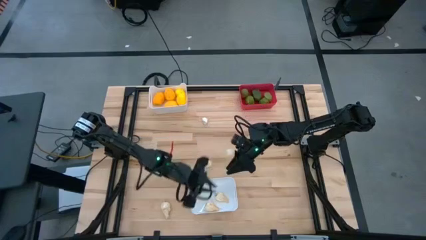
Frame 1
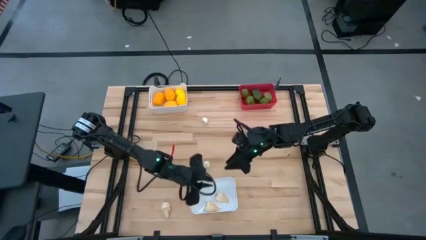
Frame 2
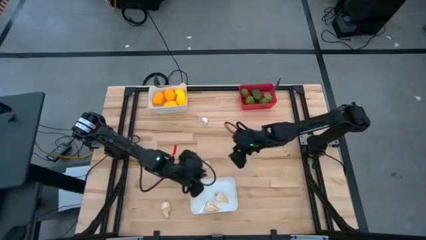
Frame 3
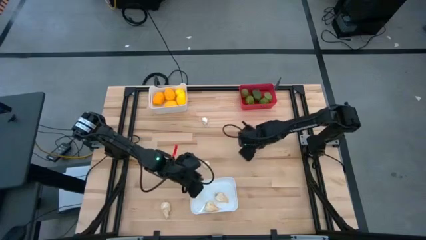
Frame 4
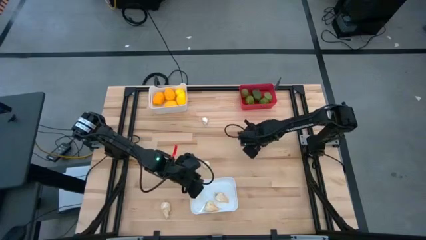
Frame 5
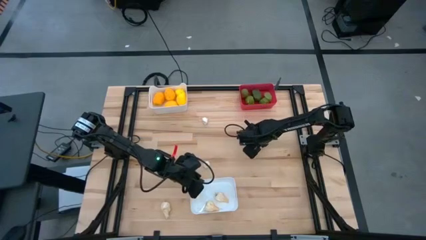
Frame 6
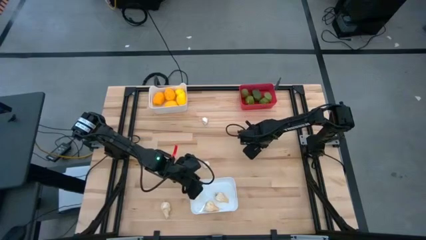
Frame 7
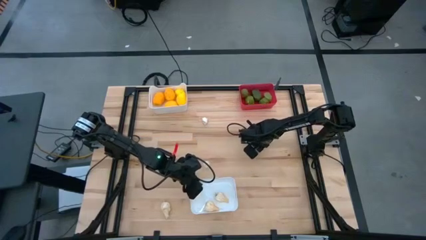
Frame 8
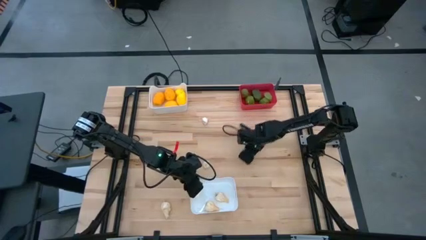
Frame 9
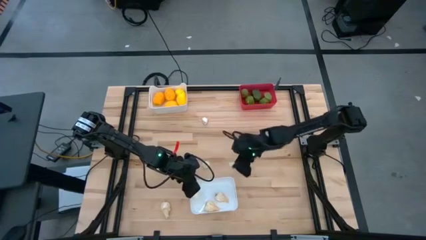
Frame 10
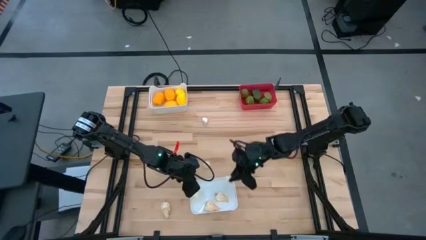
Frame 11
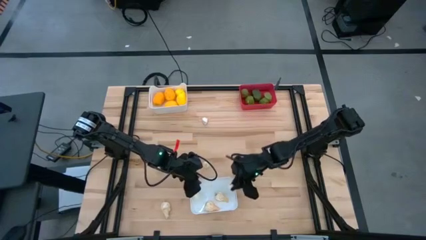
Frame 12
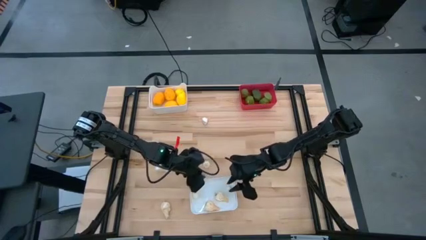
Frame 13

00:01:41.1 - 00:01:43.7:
Task: Sort produce into baskets
Put the white garlic into the bottom white bin

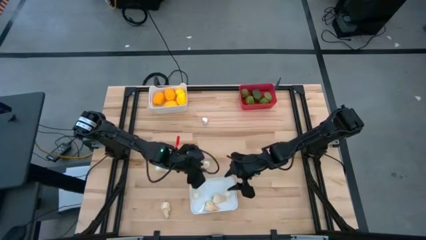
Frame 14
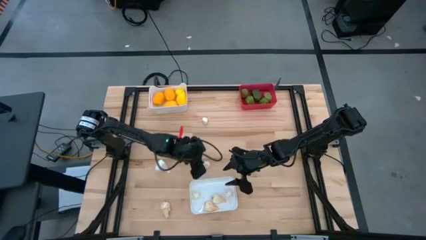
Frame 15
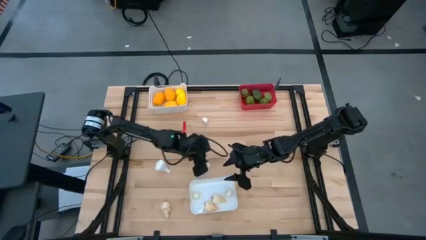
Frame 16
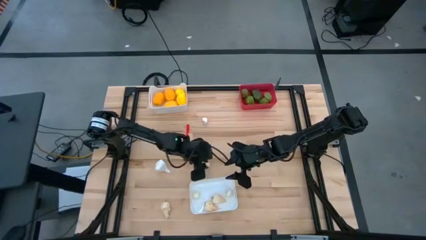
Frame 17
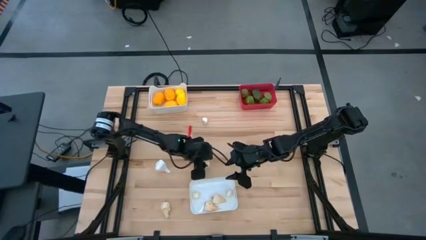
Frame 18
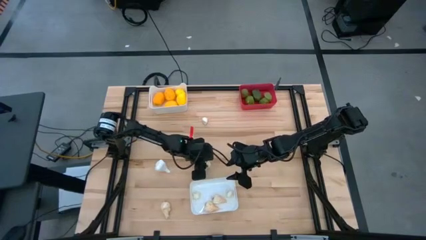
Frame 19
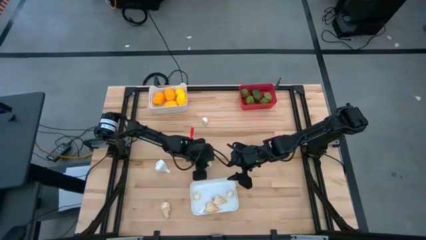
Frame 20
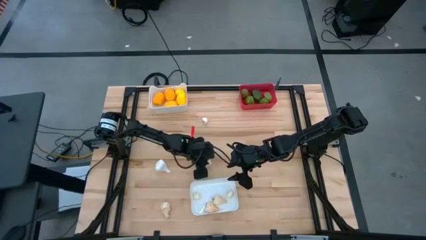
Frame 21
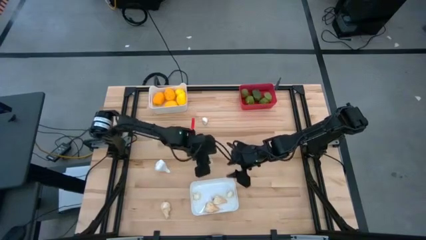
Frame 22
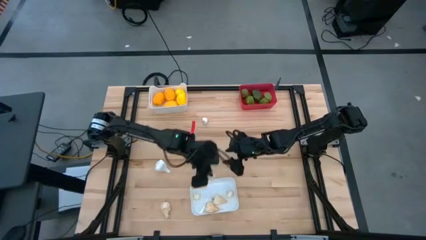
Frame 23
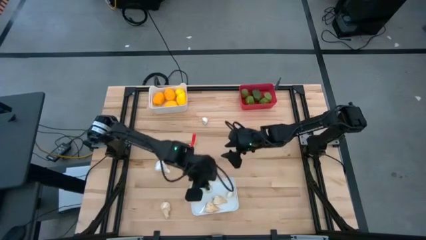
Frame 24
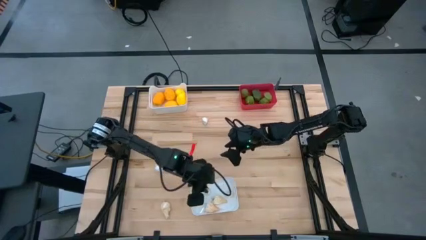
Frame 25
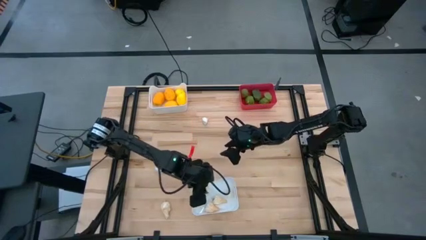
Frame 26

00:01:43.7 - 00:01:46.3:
Put the white garlic into the bottom white bin

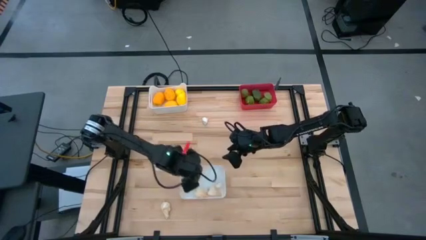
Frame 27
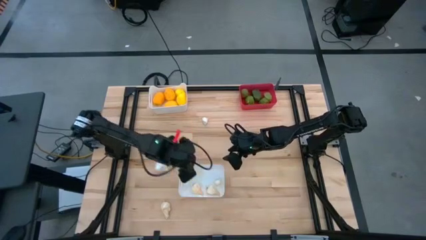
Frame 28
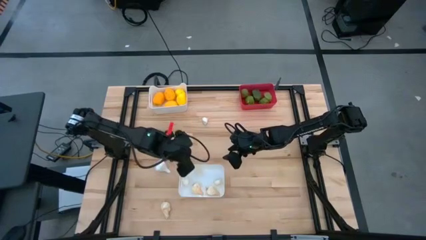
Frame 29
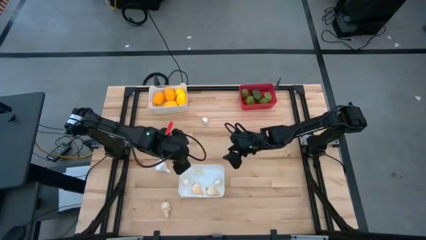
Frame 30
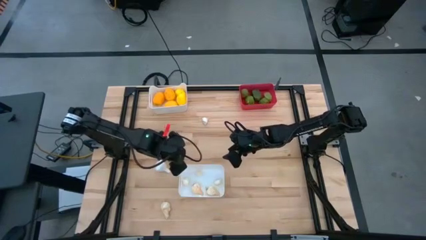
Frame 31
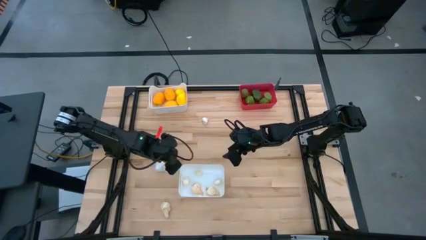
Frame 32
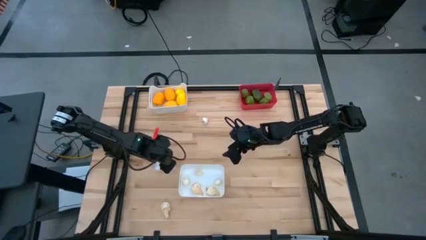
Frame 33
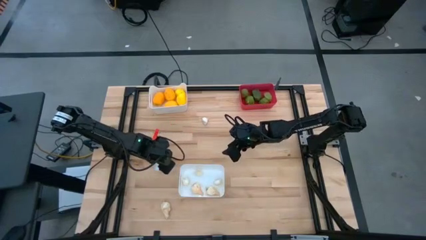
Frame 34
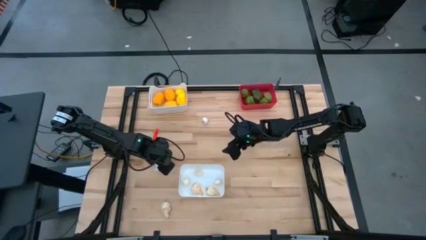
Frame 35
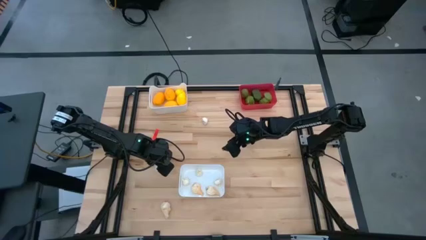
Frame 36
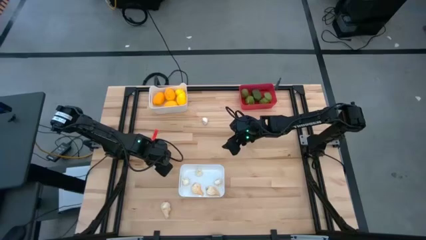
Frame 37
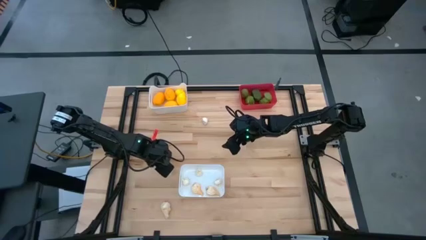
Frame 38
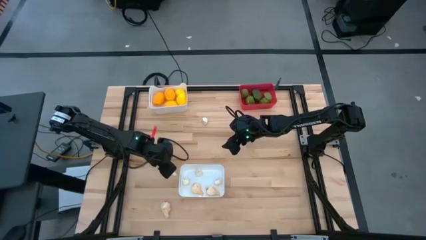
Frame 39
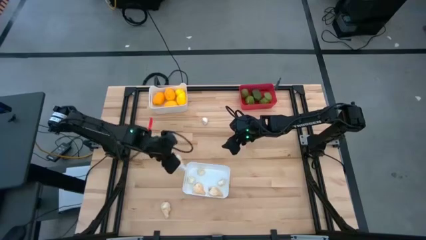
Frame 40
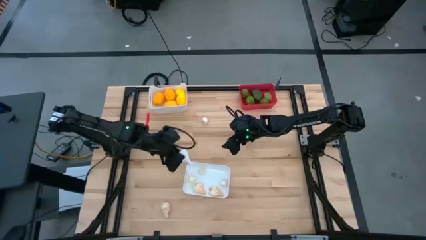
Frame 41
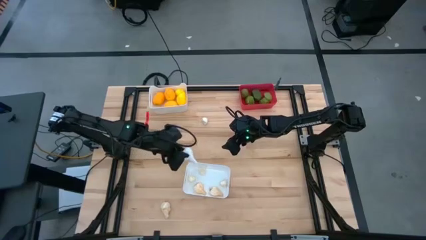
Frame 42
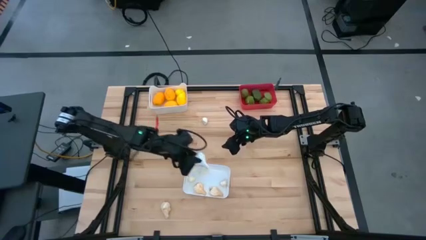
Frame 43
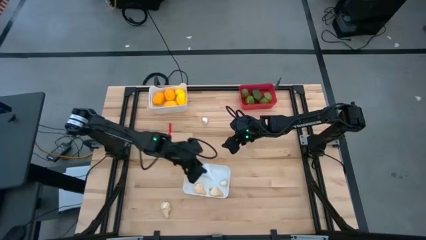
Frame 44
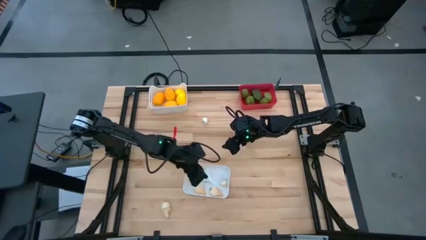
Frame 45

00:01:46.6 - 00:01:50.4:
Put the white garlic into the bottom white bin

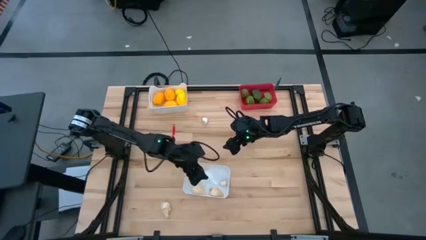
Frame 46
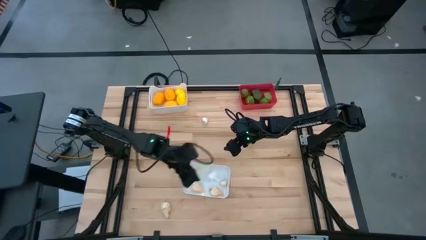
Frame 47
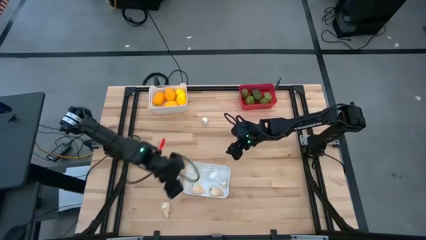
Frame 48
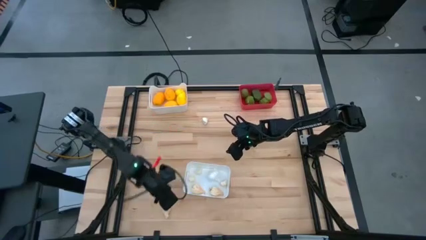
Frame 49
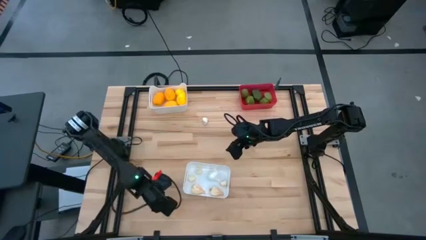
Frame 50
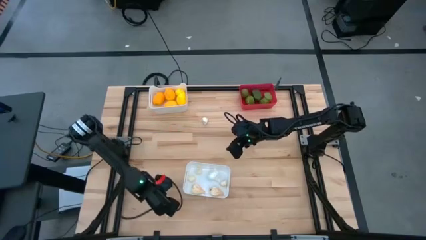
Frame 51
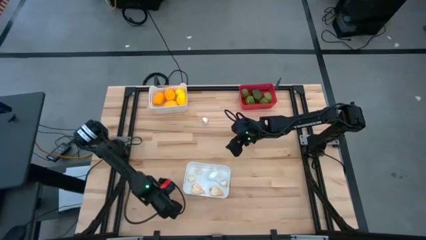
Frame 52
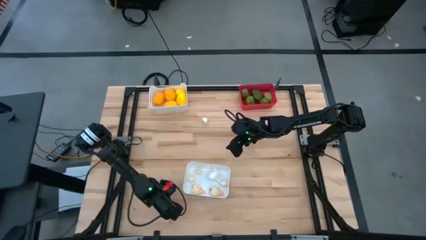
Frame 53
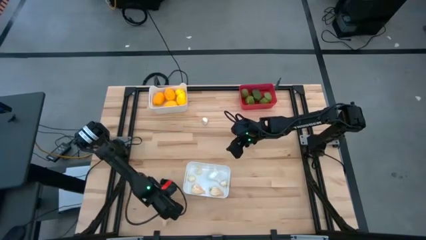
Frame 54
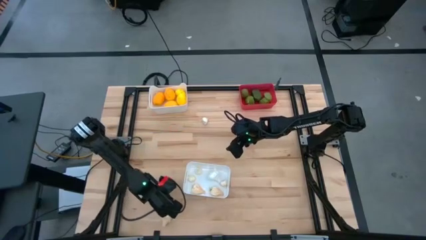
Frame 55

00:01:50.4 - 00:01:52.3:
Put the white garlic into the bottom white bin

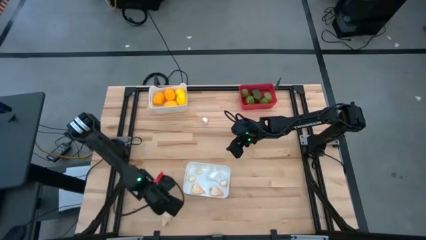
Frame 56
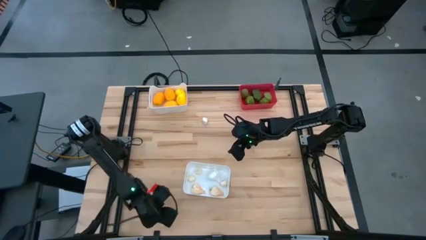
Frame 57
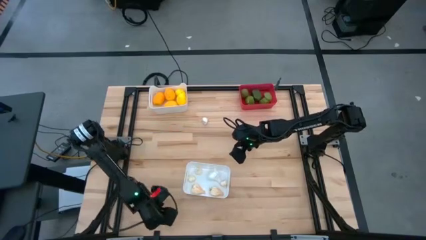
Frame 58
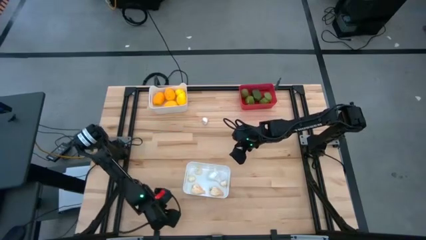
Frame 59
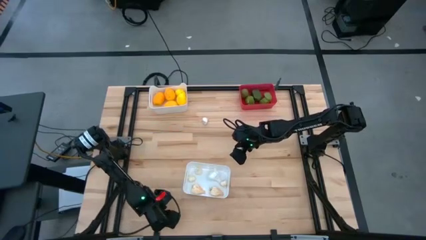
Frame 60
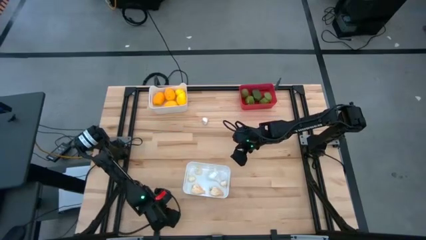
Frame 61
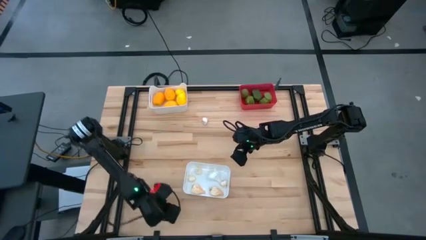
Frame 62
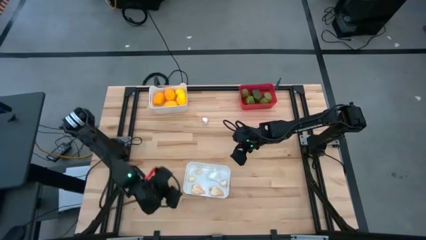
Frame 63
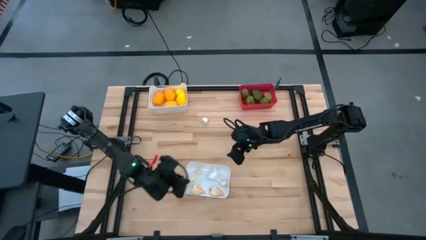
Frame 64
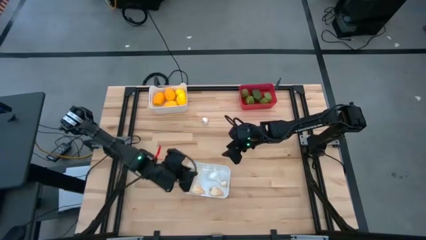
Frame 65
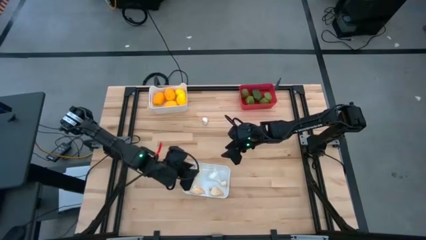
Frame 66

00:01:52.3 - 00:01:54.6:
Put the white garlic into the bottom white bin

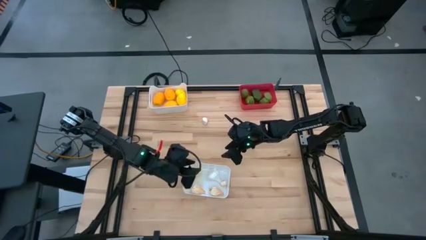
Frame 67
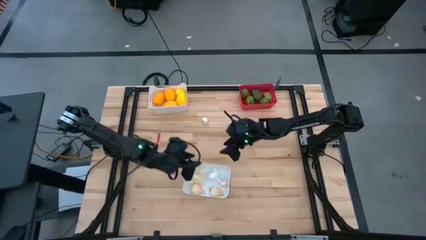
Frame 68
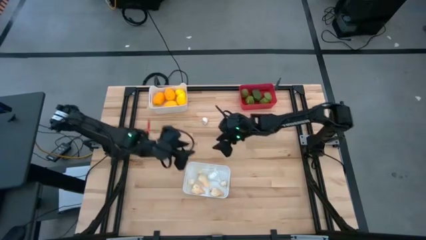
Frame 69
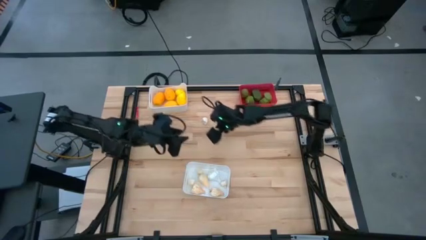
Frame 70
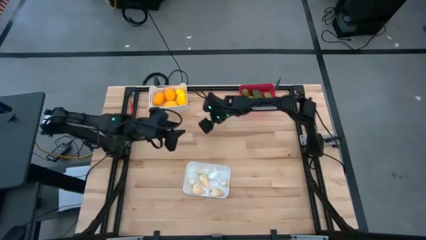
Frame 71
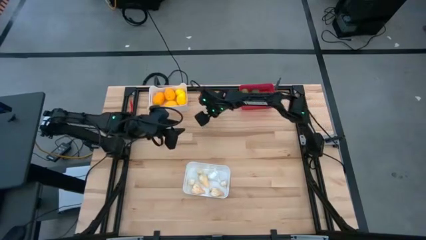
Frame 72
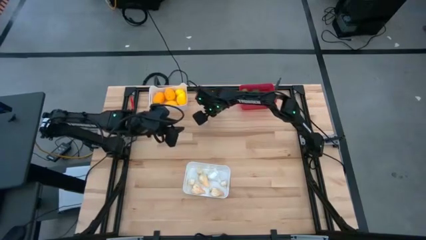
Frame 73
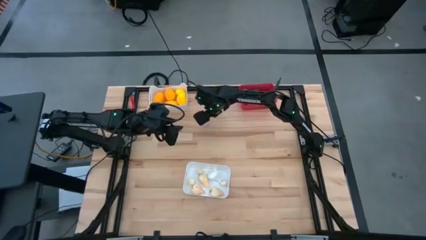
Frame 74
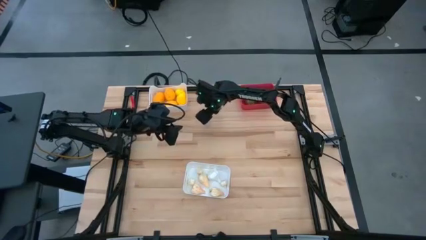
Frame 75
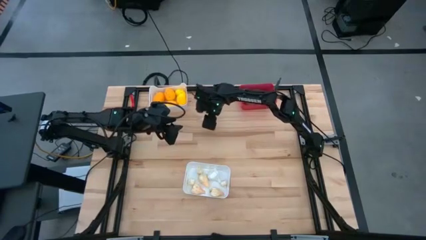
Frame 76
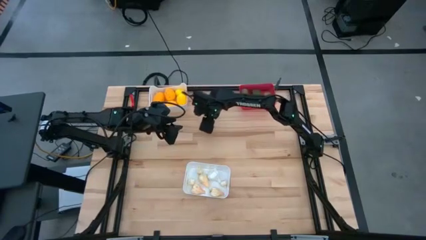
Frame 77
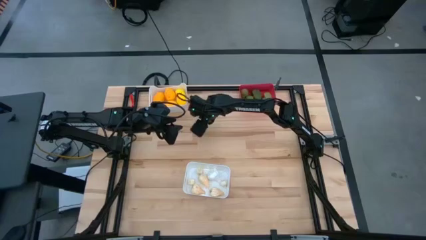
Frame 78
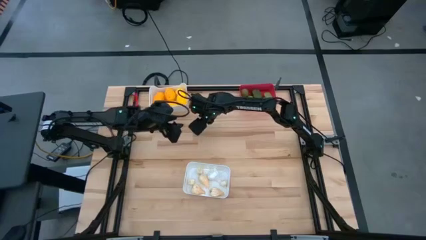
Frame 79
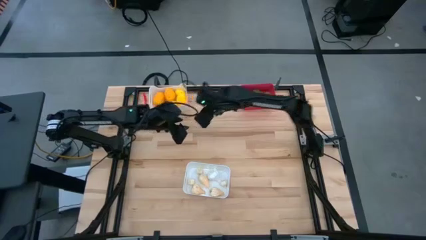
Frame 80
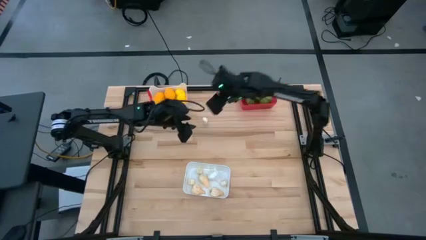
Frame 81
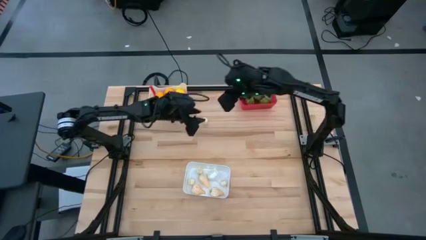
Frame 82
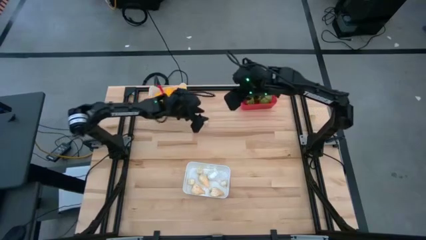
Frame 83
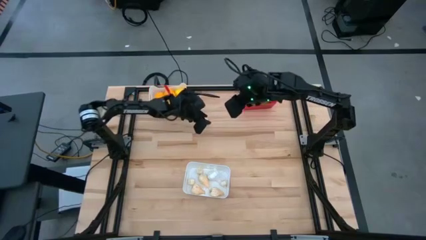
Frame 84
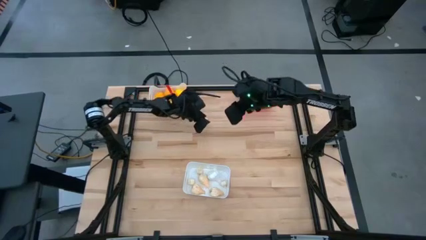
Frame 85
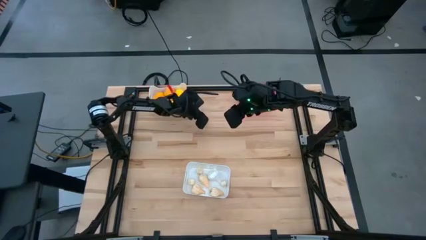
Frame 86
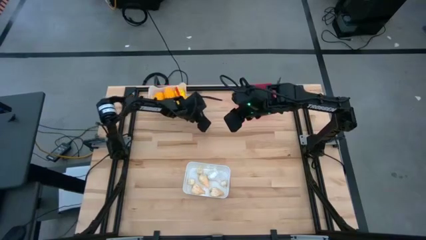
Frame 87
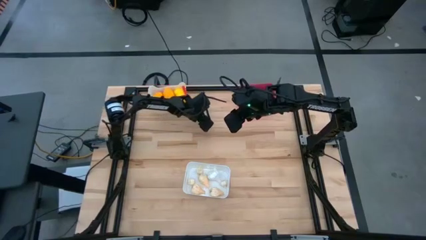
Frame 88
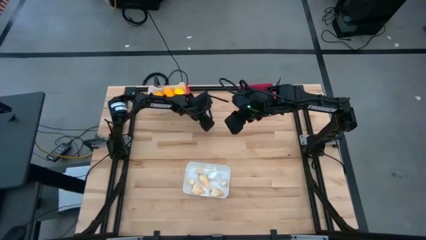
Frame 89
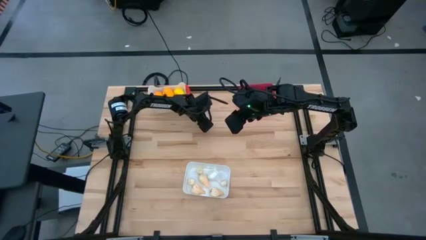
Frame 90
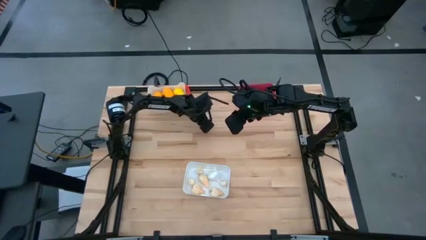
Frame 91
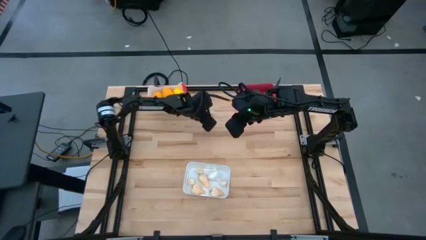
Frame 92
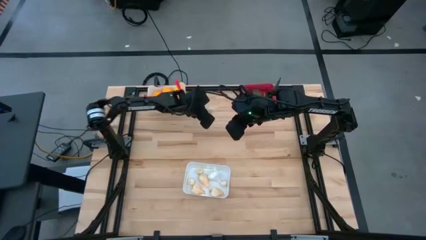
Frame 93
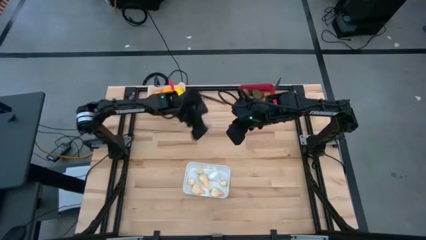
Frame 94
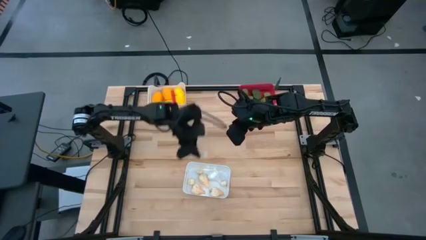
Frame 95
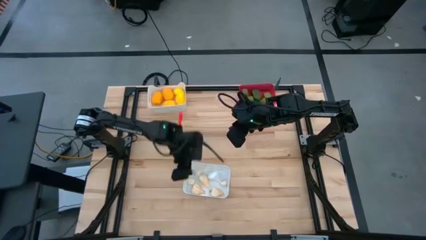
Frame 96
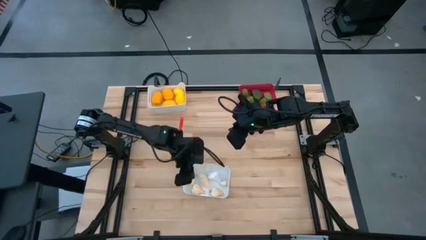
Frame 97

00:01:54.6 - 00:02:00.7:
Put the white garlic into the bottom white bin
